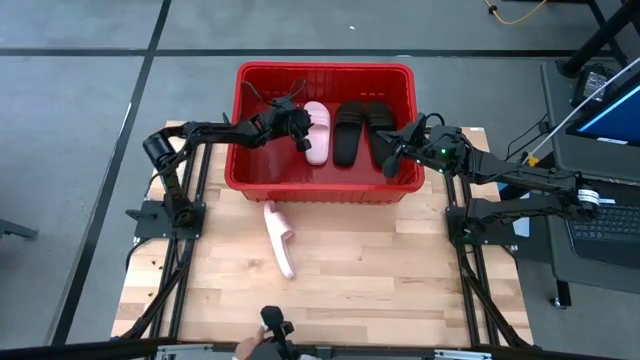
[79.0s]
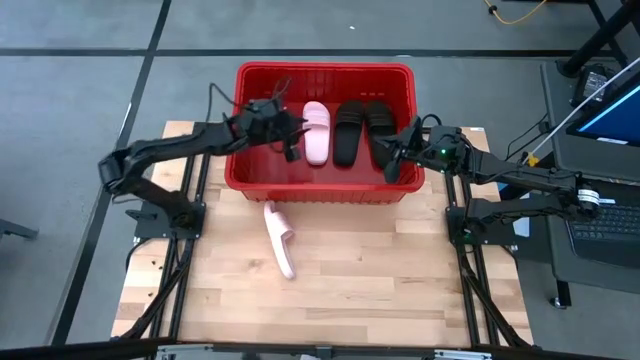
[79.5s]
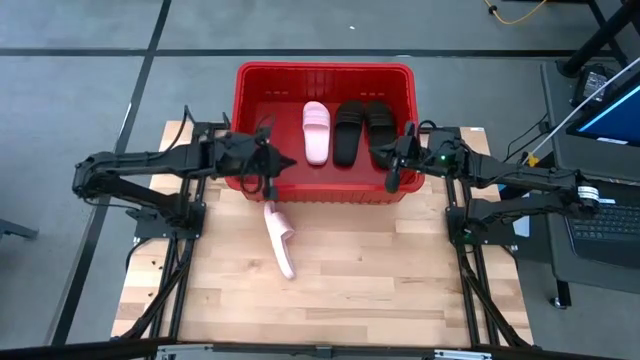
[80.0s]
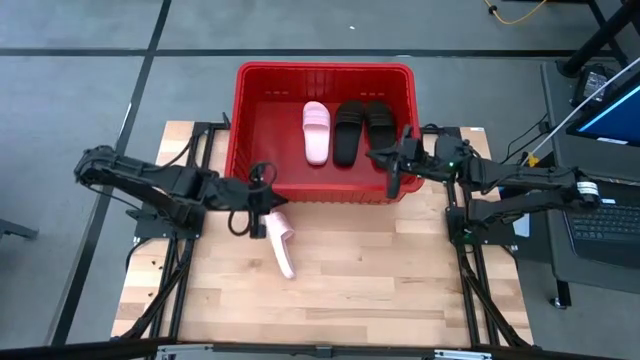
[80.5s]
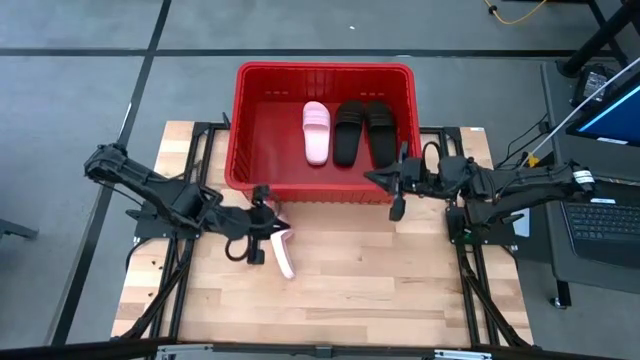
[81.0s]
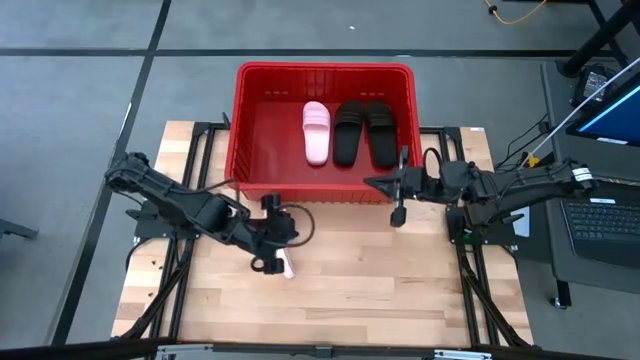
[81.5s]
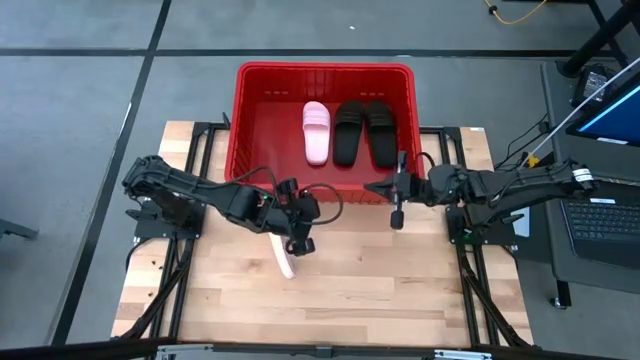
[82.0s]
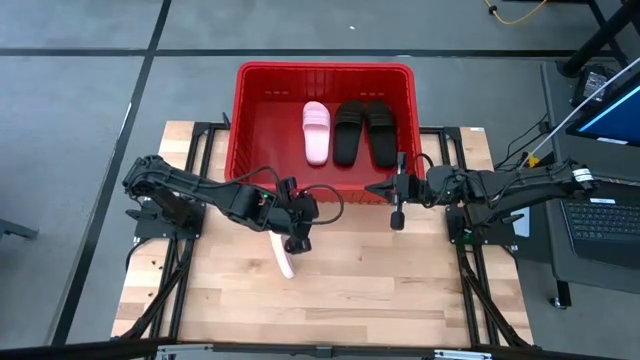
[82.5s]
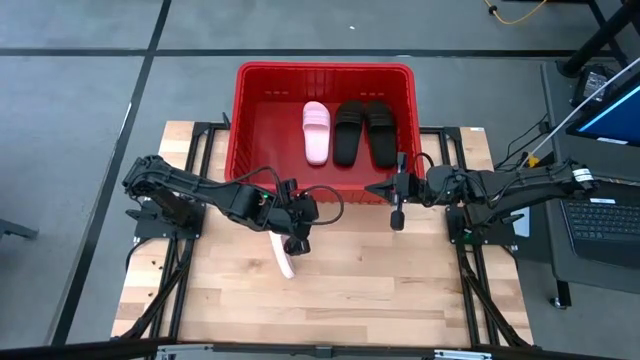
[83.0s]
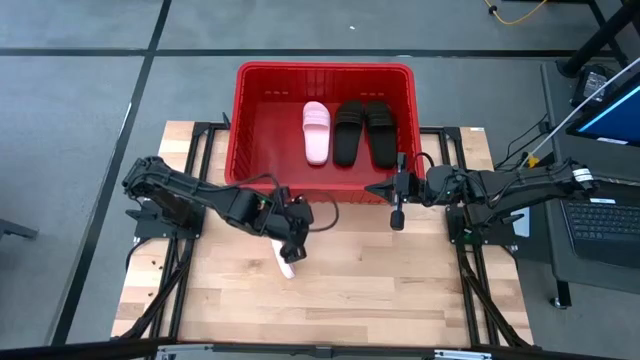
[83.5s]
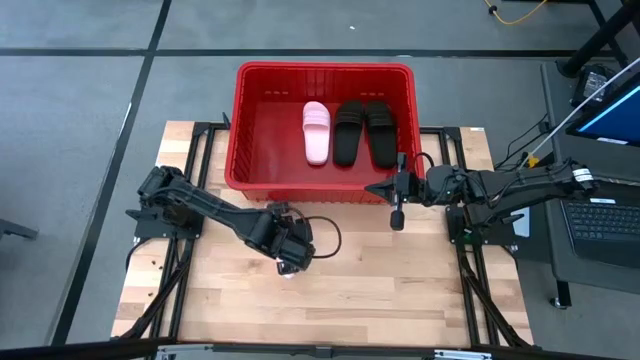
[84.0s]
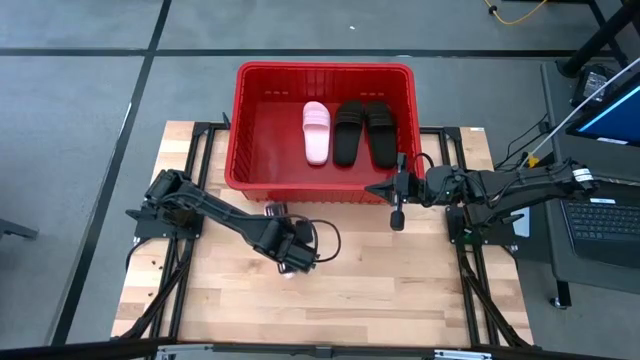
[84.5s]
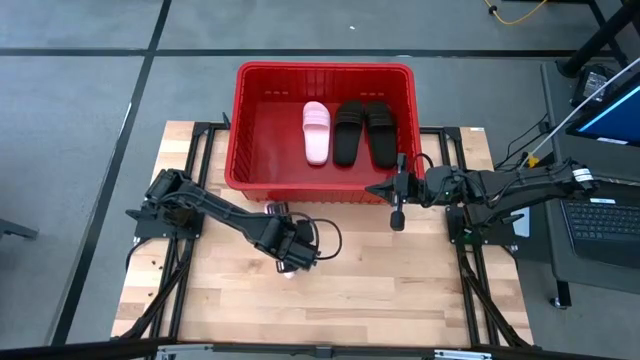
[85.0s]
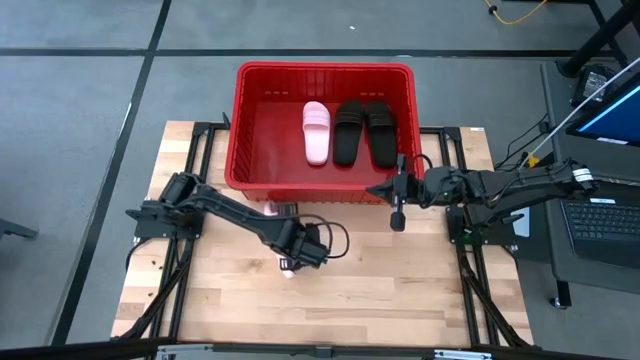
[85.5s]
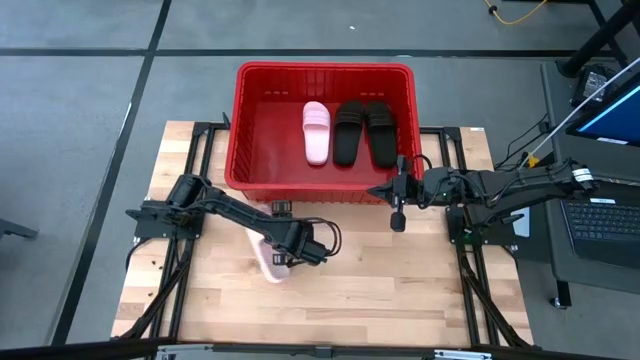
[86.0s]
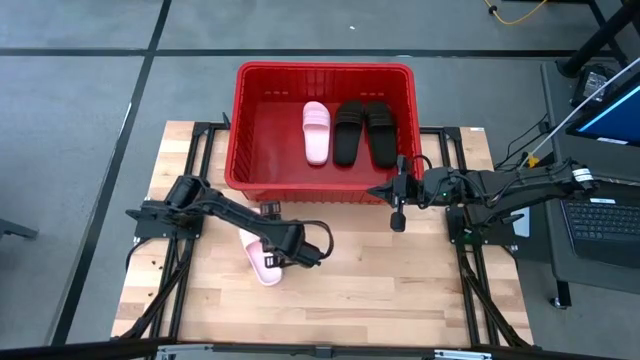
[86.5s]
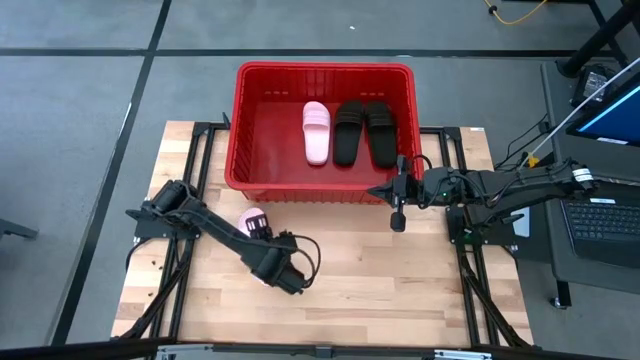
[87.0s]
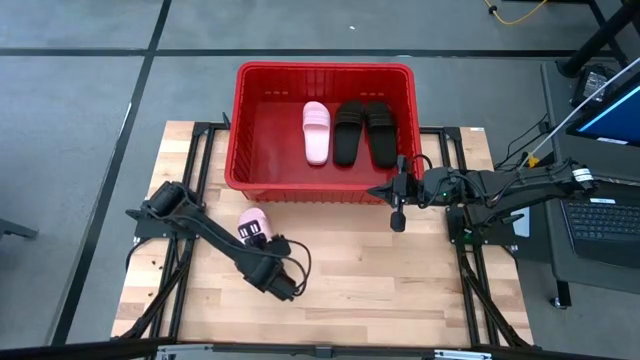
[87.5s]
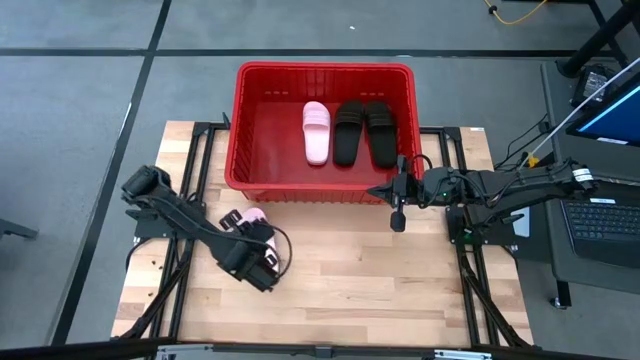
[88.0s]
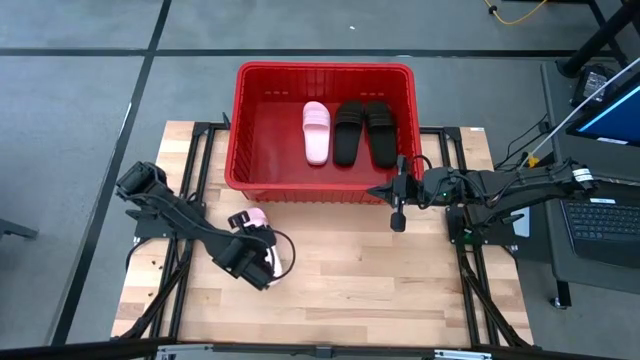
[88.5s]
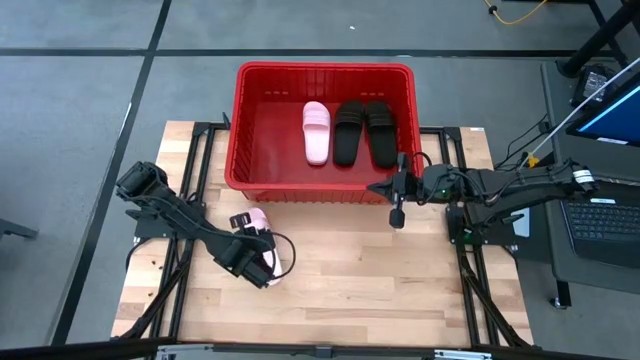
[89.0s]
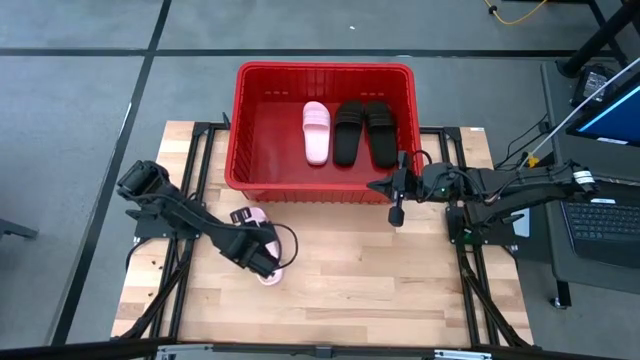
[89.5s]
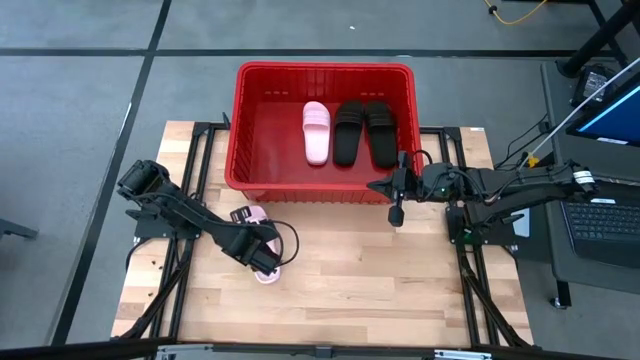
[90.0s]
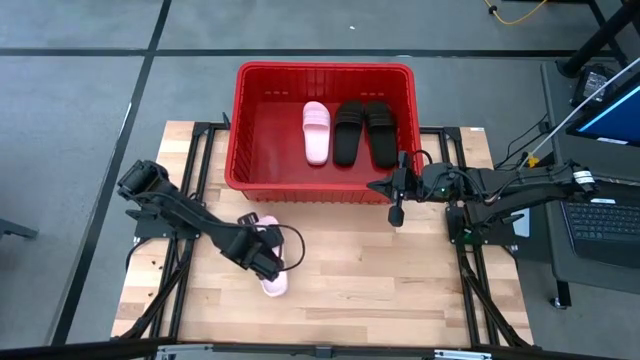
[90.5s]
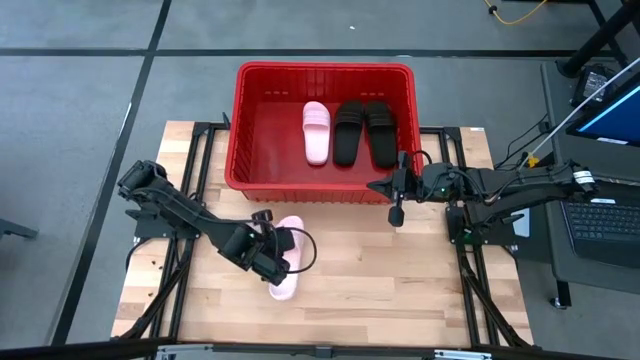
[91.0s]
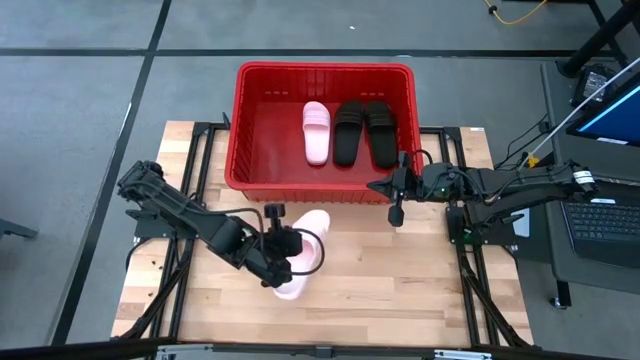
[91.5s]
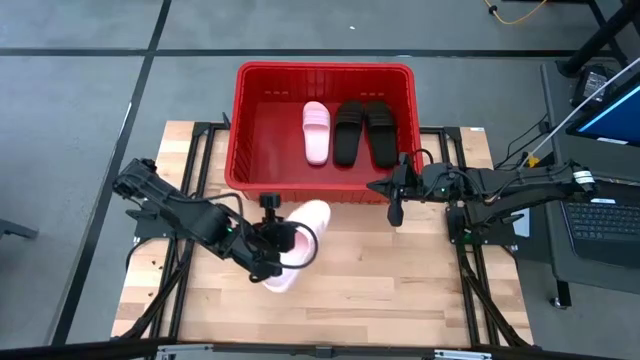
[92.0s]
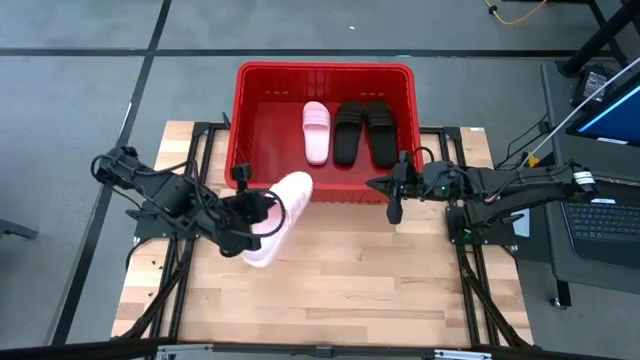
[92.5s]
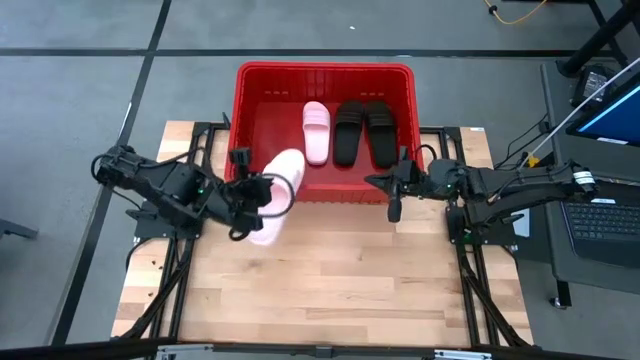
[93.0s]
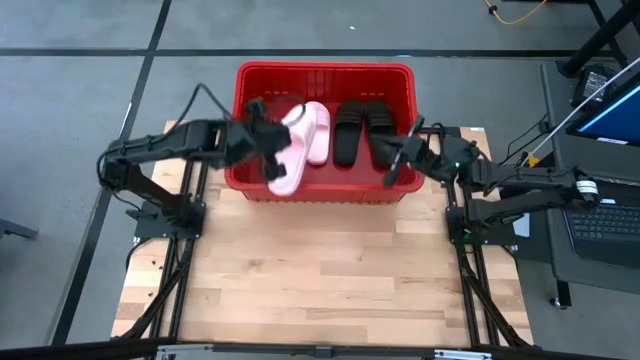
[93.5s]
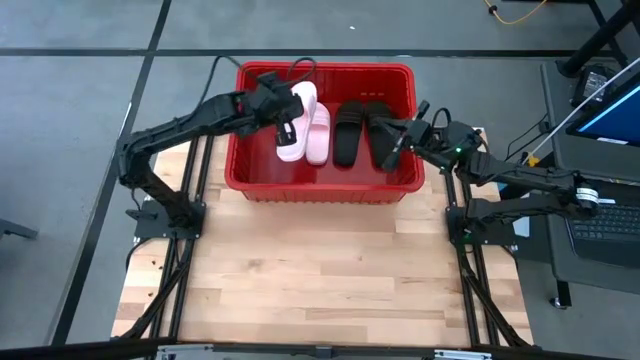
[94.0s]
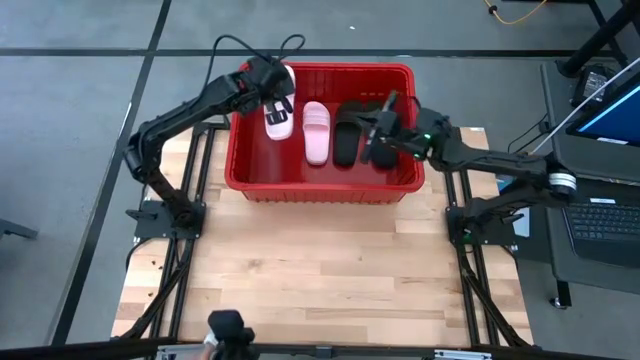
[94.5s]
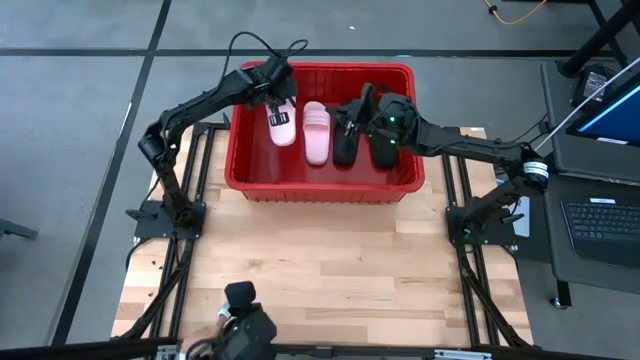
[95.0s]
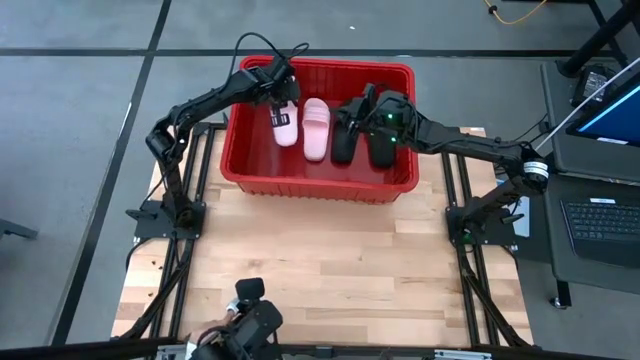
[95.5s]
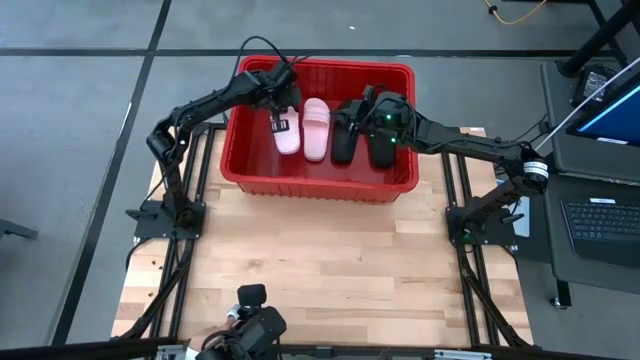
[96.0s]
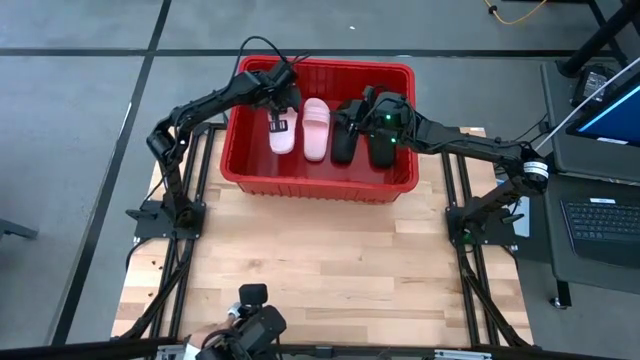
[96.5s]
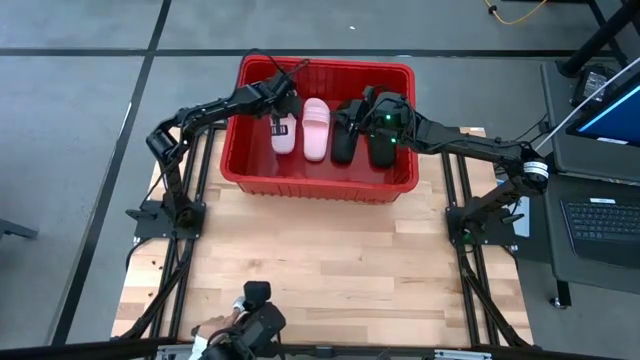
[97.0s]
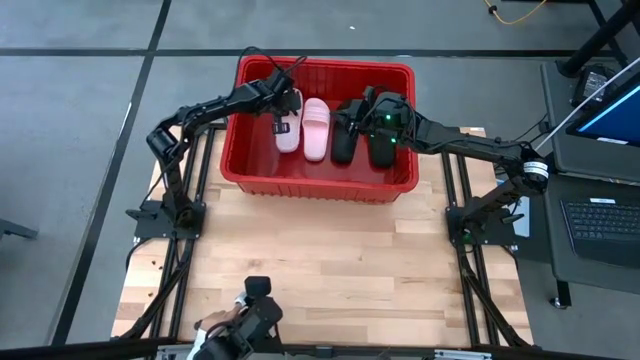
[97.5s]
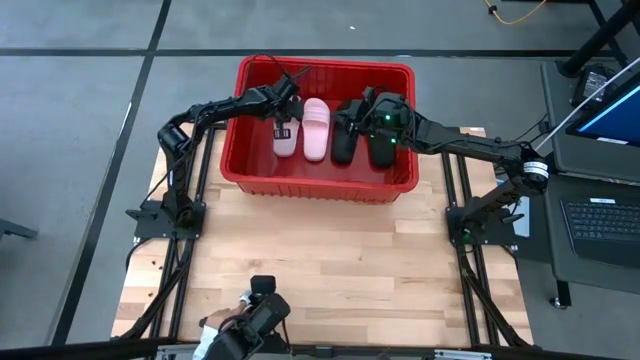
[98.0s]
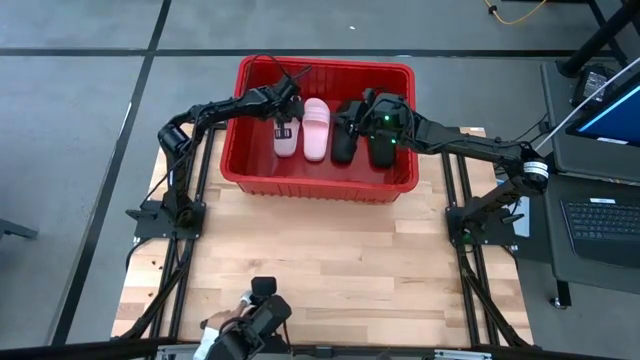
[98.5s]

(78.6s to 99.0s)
Task: Pick and place slides into bin
Put the pink slide into the red bin

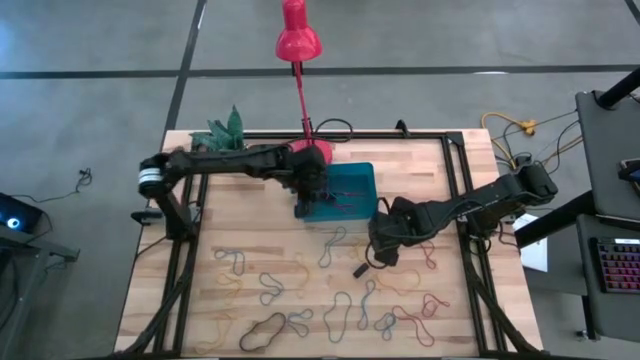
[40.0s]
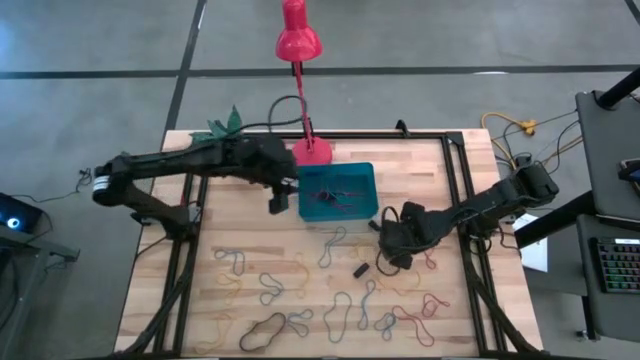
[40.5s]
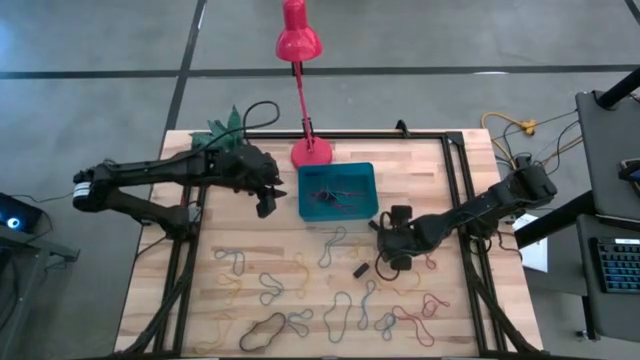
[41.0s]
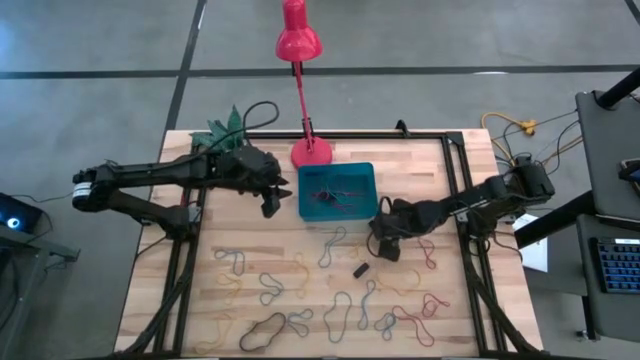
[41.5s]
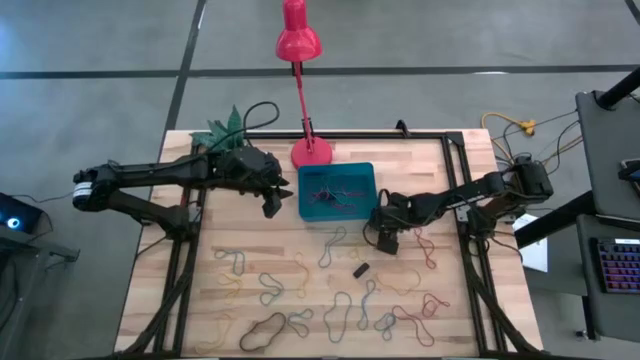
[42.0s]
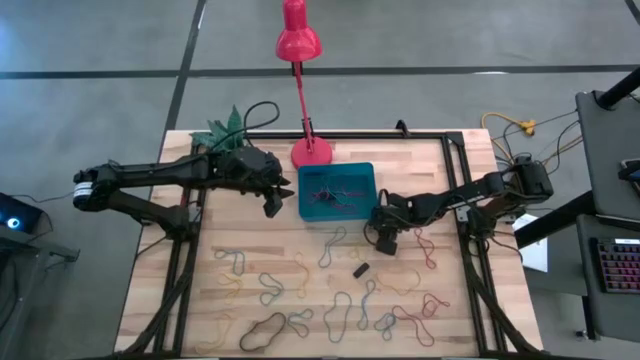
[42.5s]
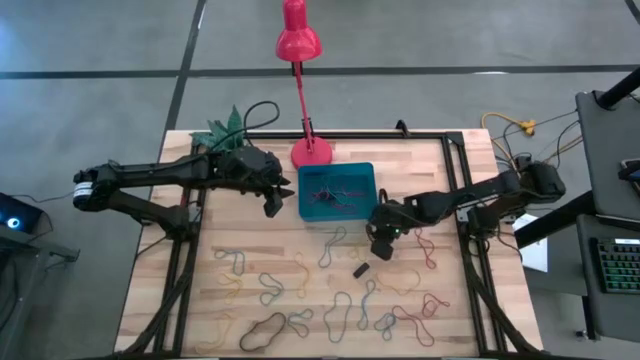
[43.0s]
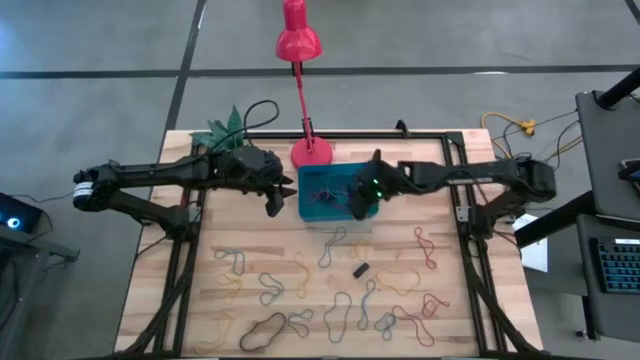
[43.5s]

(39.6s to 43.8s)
Task: Pick and place rubber bands into bin
Put the black rubber band into the blue bin
